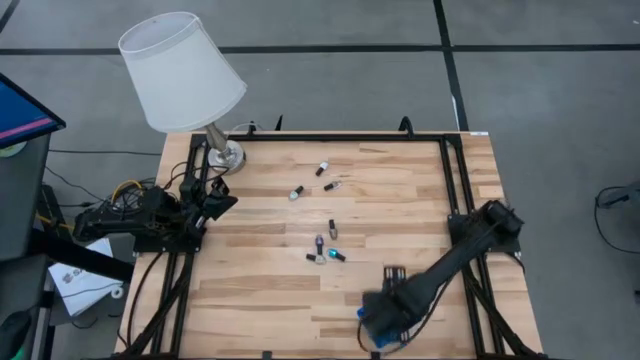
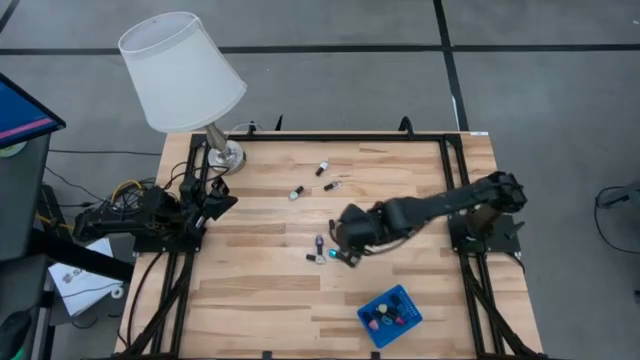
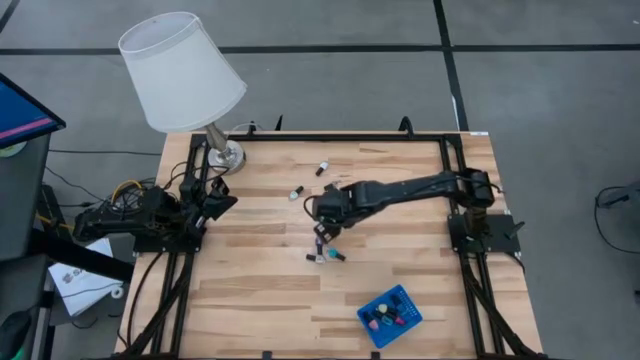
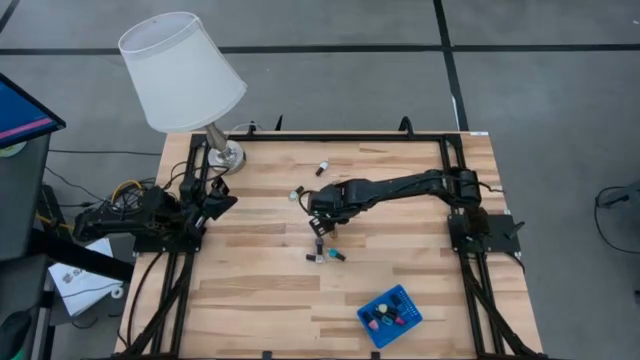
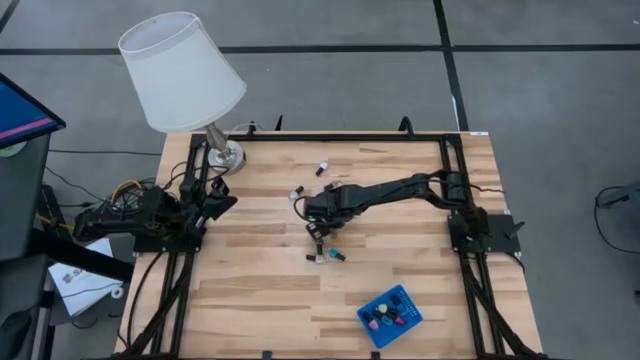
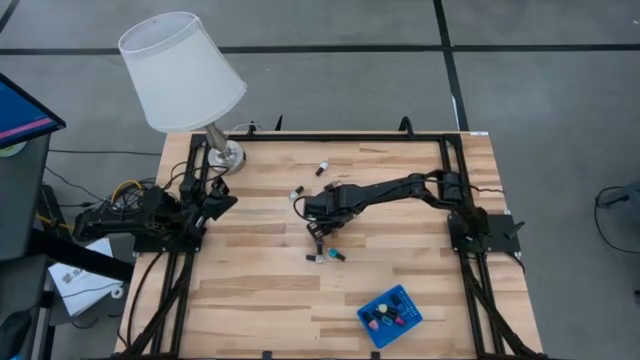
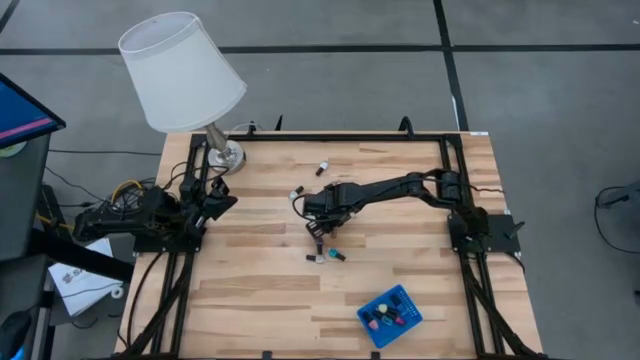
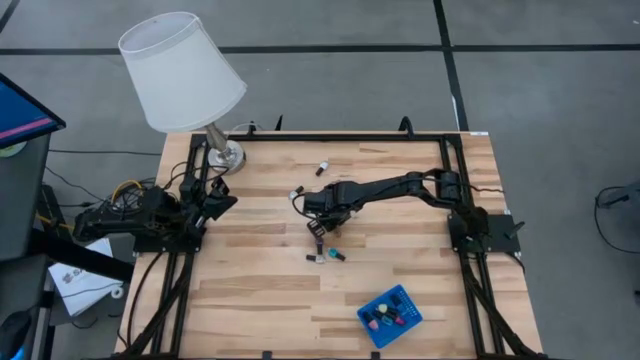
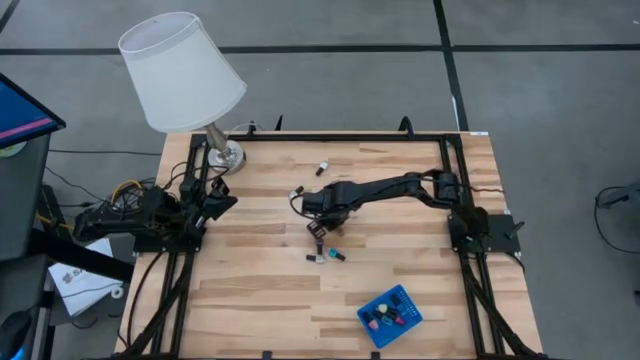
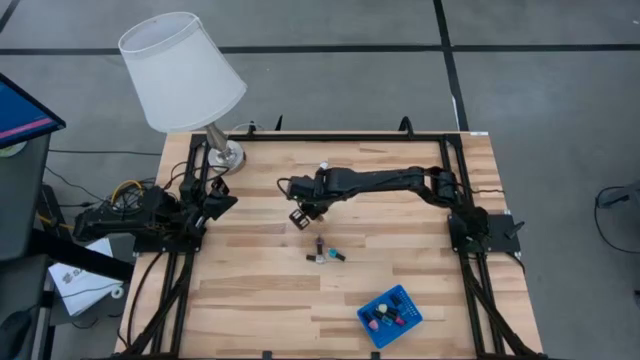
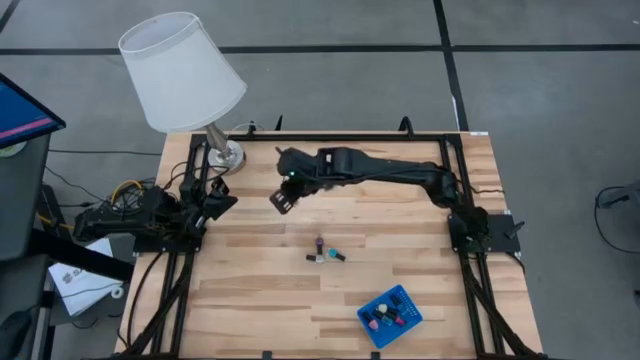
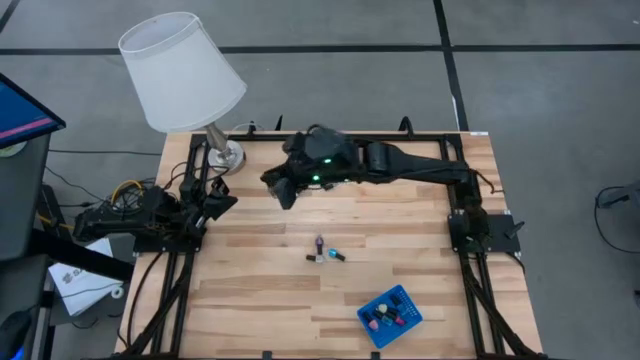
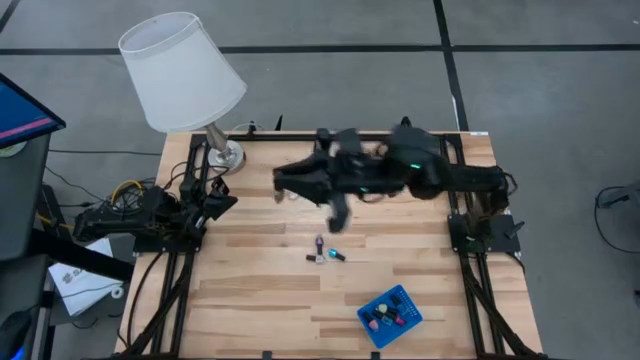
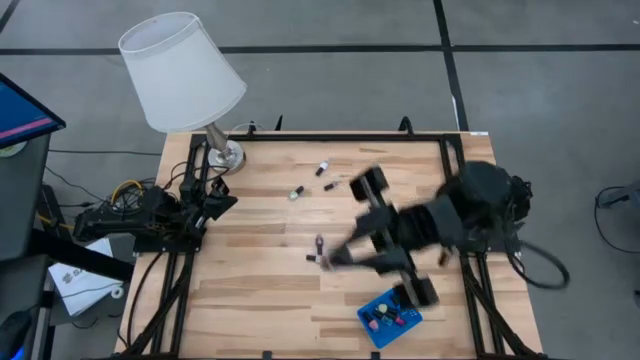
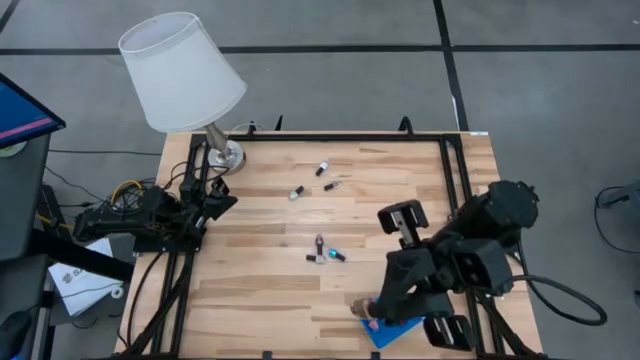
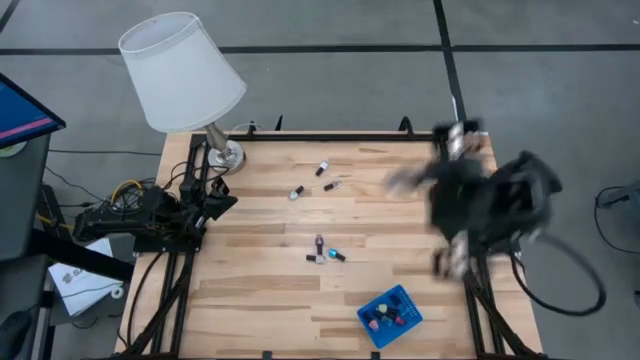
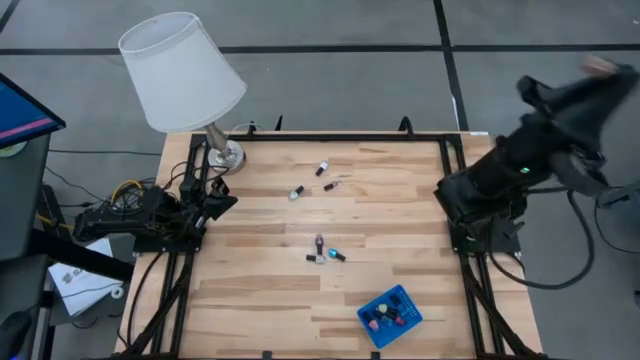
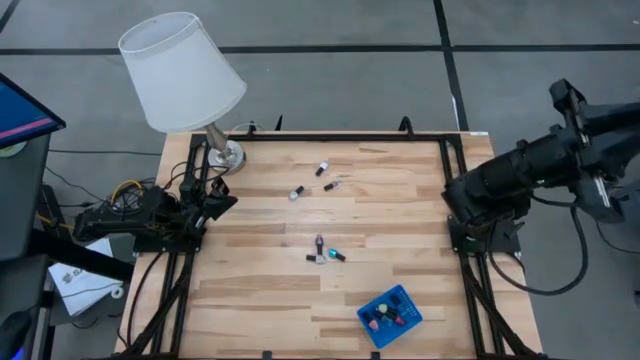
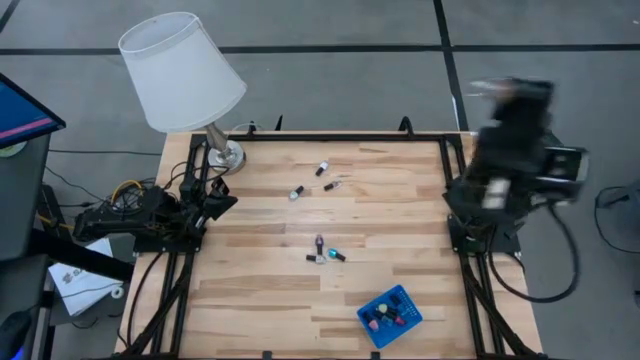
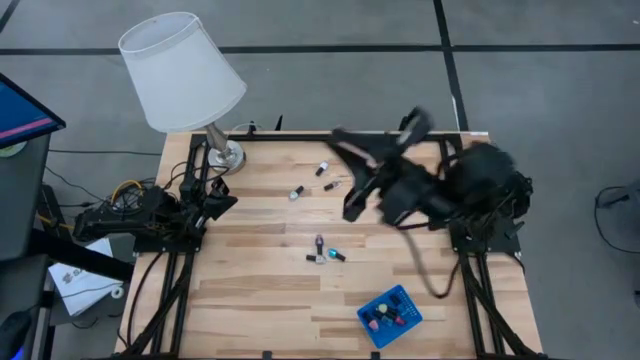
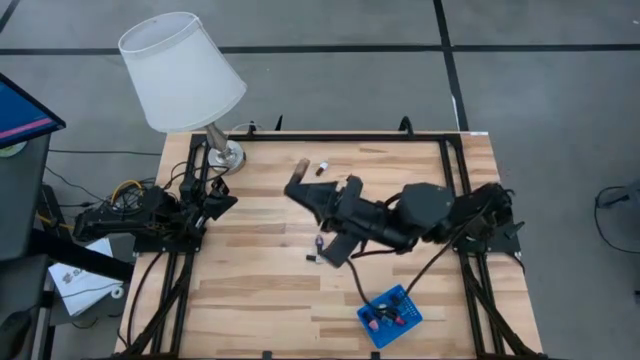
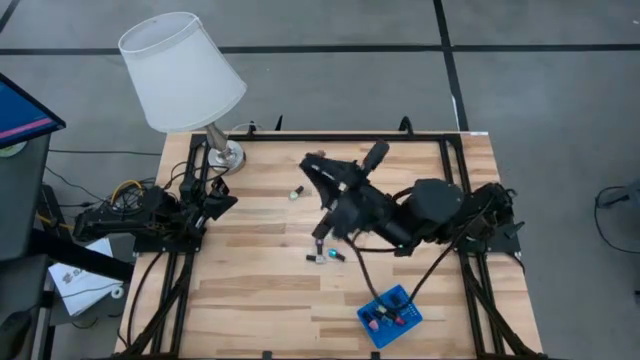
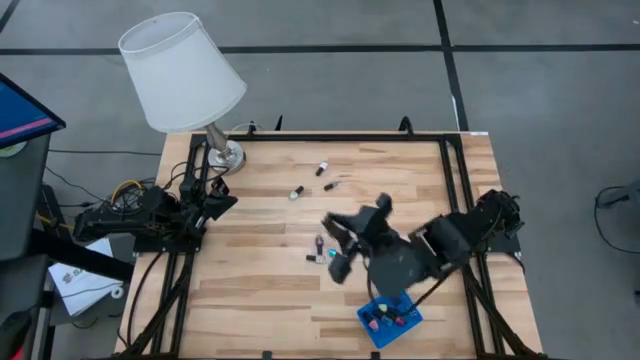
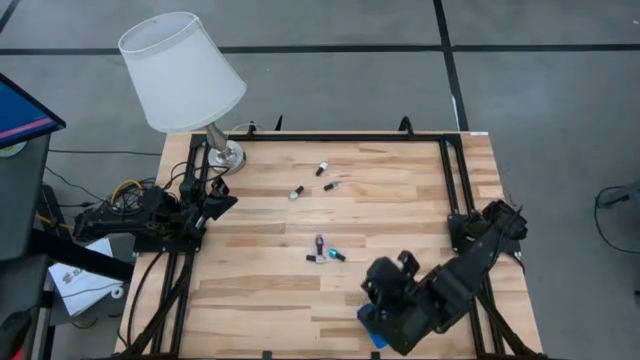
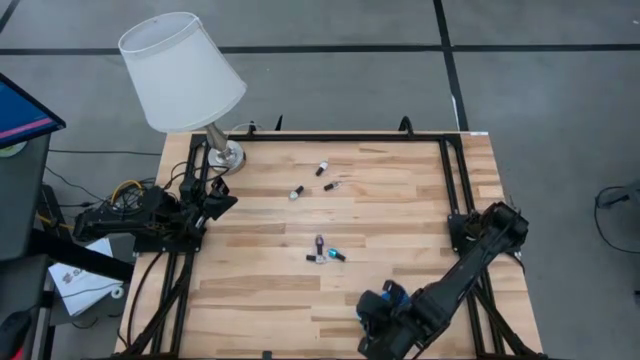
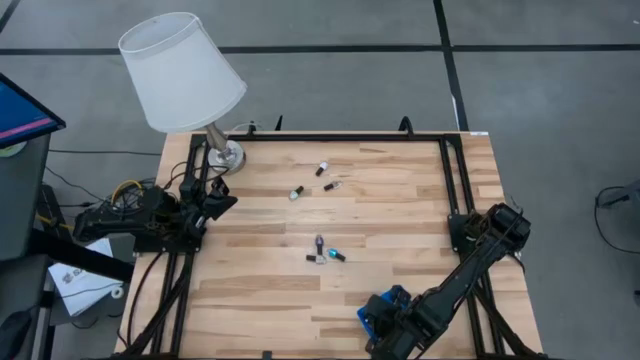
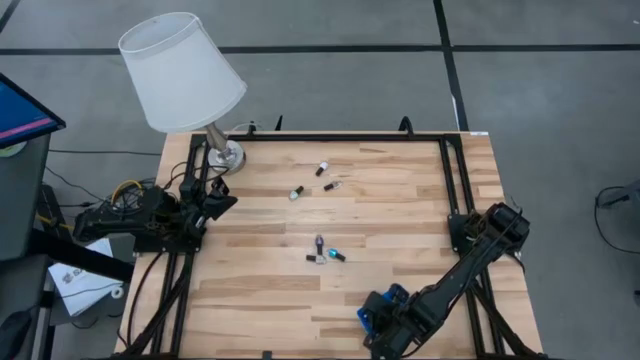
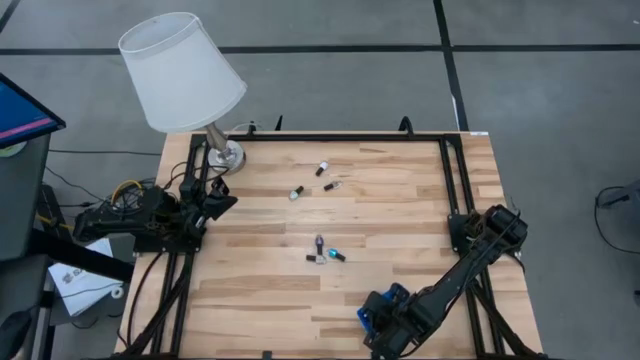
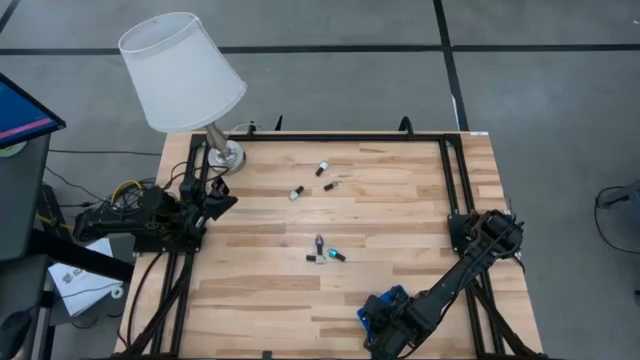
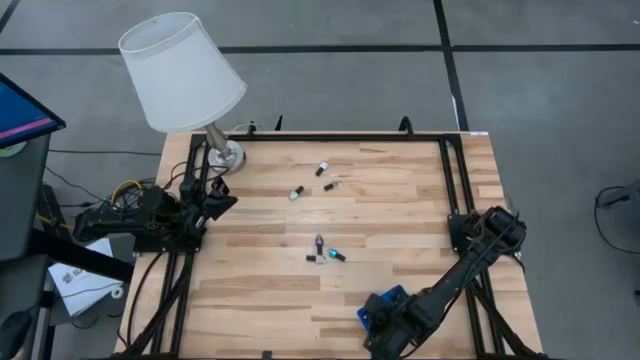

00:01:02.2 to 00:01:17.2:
Task: Pick & Place Nail Polish
Put the brown nail polish into the blue bin

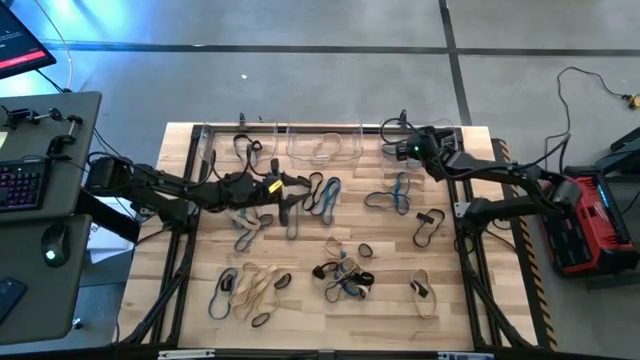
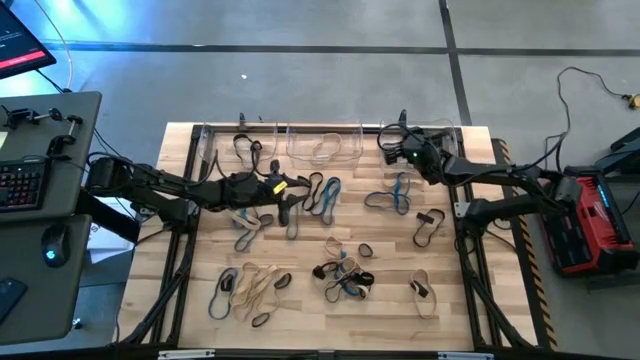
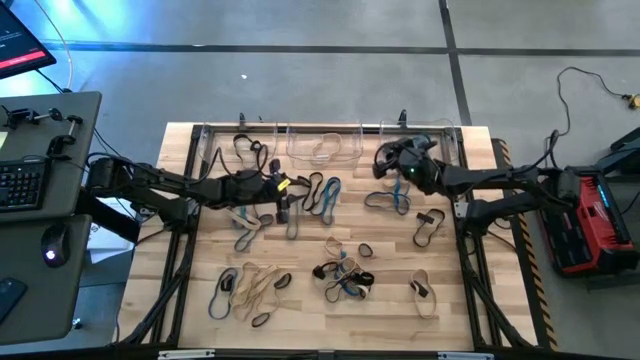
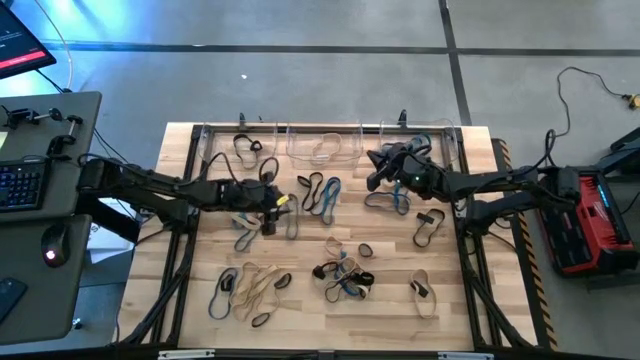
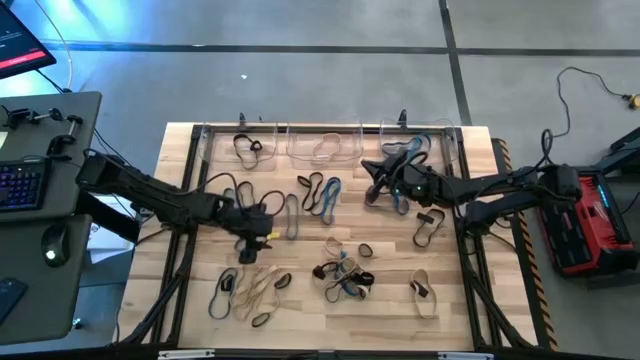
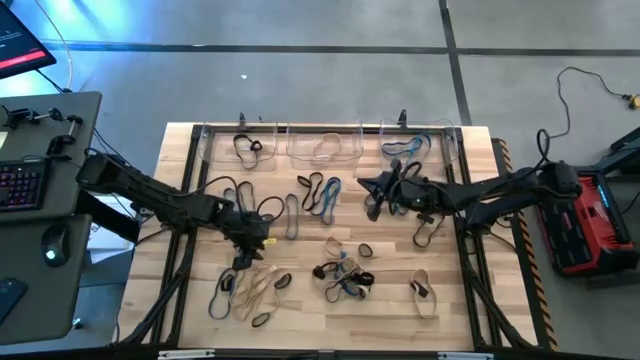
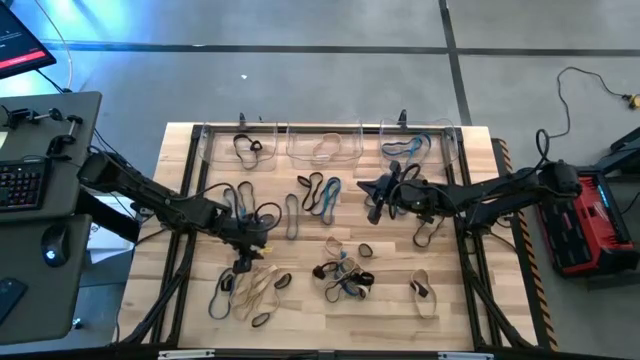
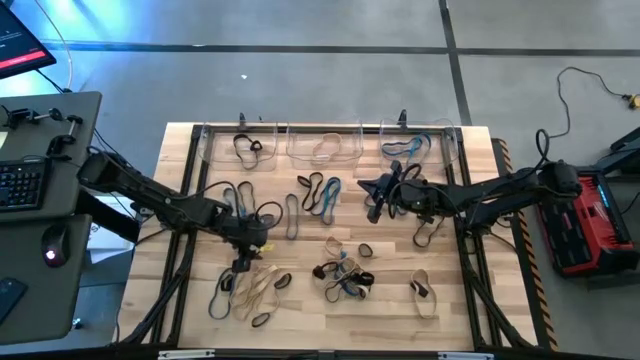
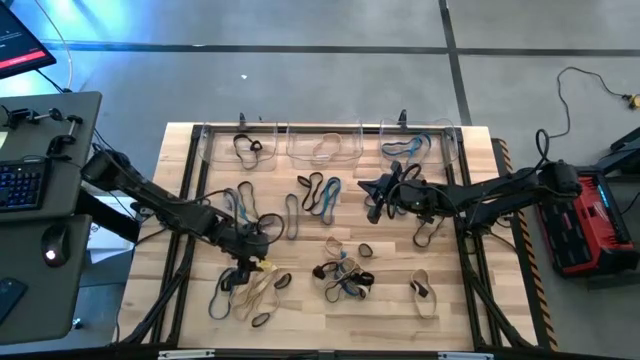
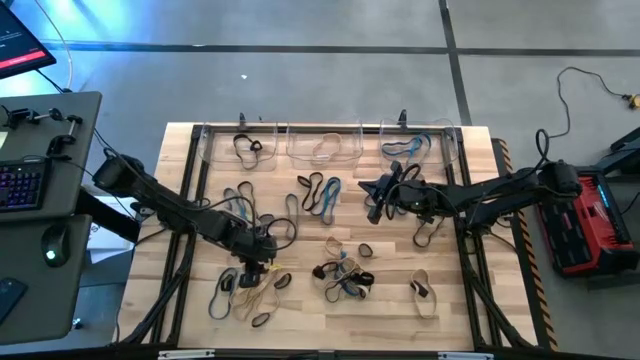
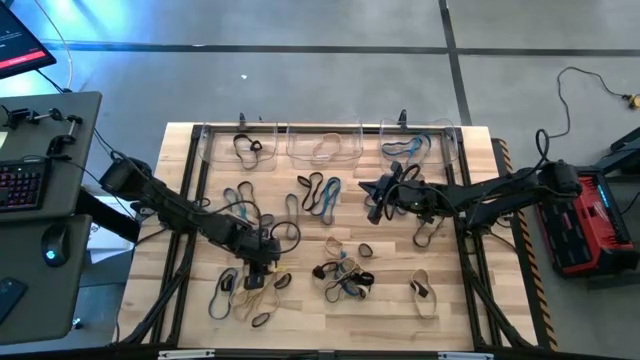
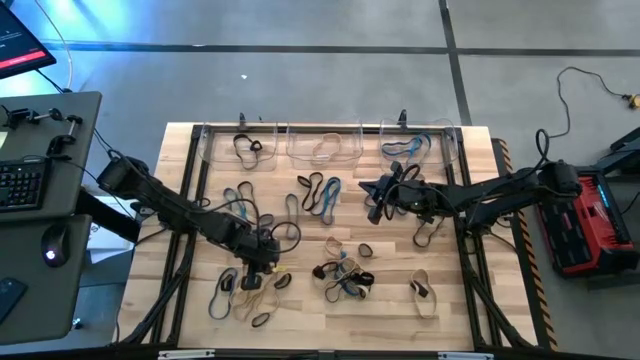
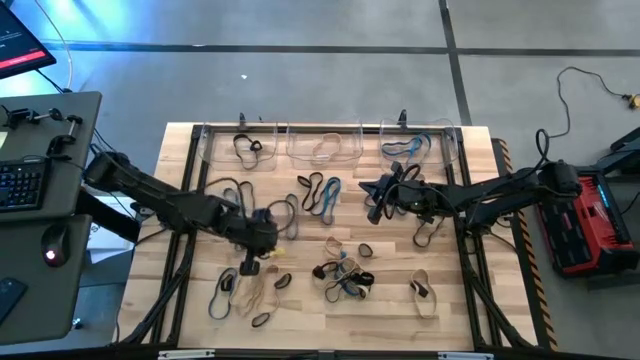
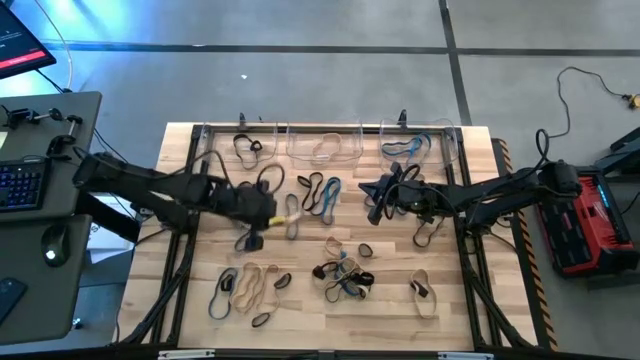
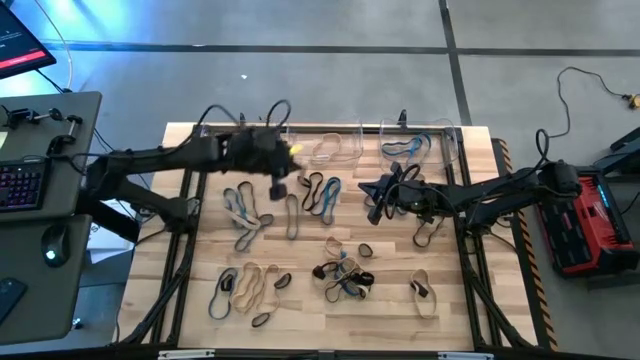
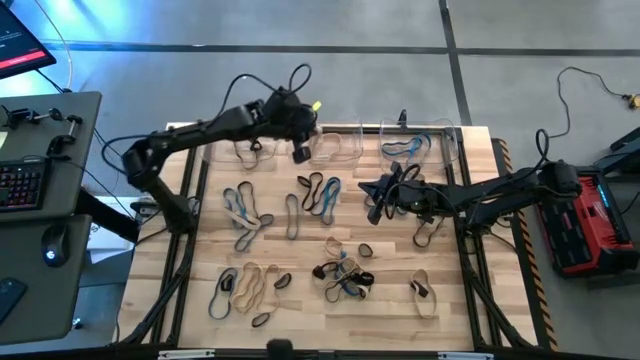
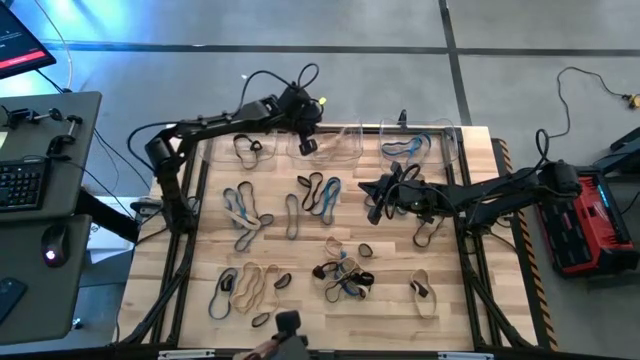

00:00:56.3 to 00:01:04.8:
Task: Sort rubber bands into baskets
Put the brown rubber band into the middle transparent bin
